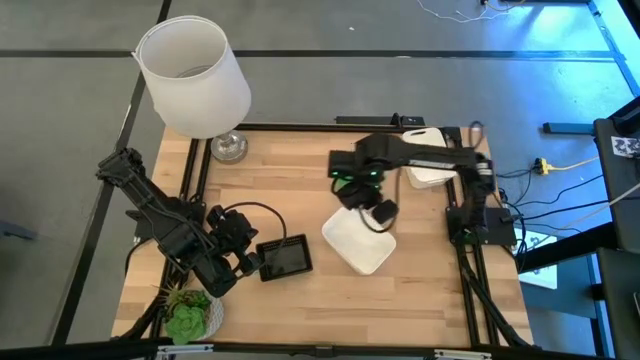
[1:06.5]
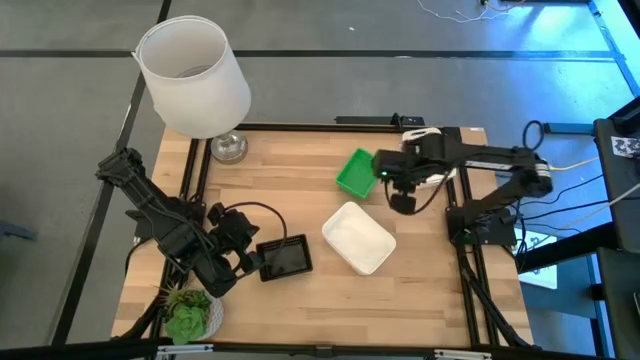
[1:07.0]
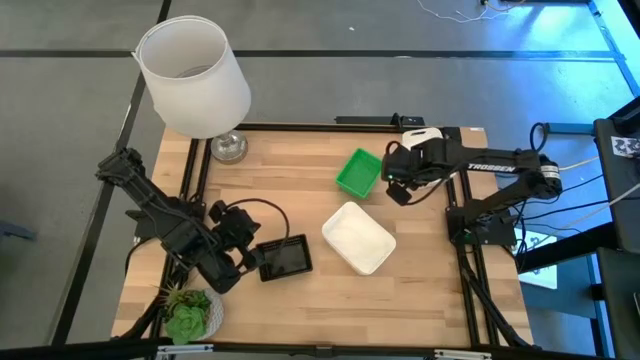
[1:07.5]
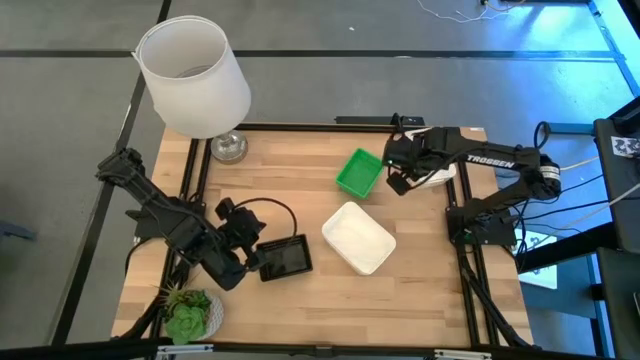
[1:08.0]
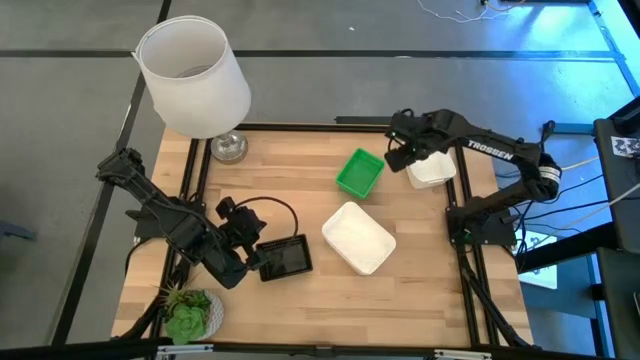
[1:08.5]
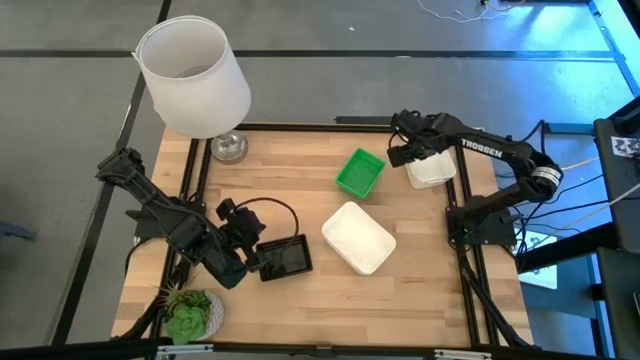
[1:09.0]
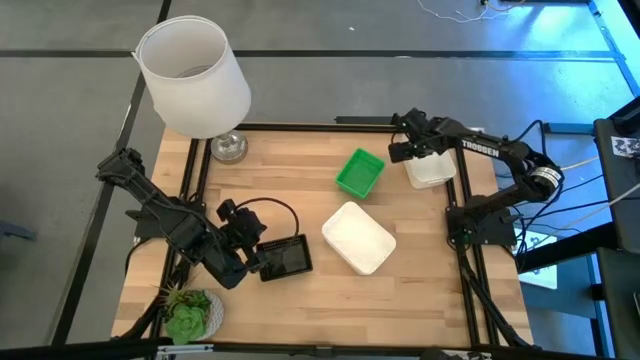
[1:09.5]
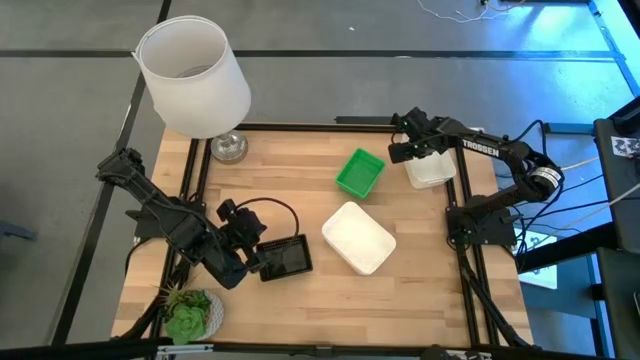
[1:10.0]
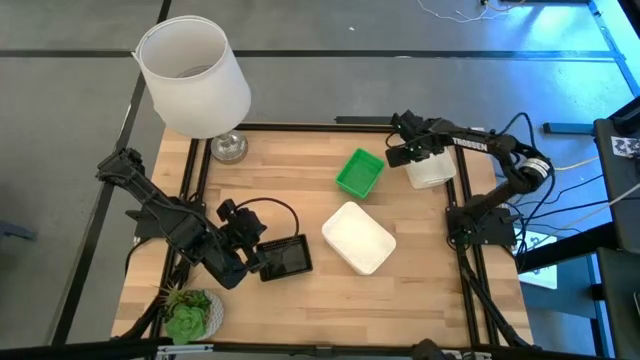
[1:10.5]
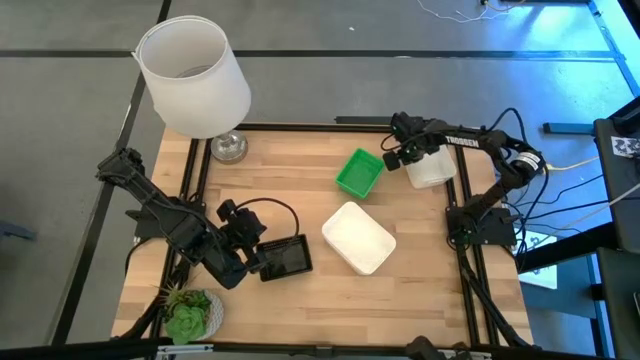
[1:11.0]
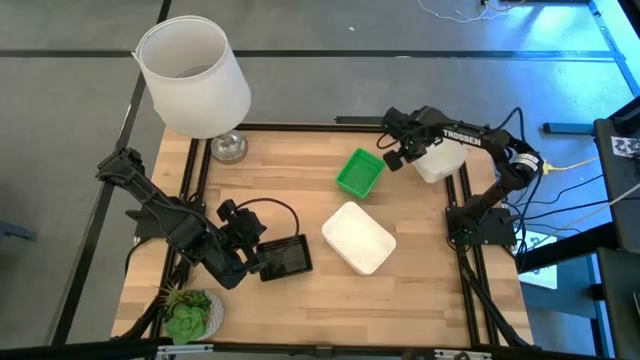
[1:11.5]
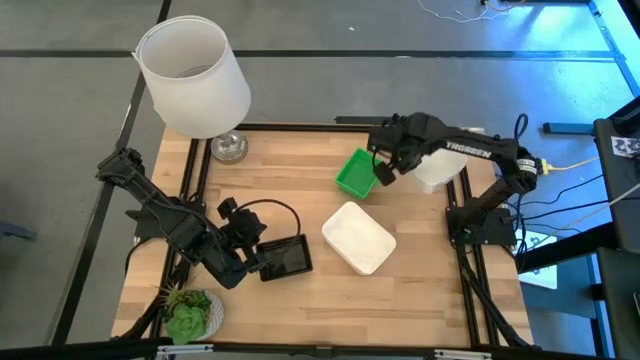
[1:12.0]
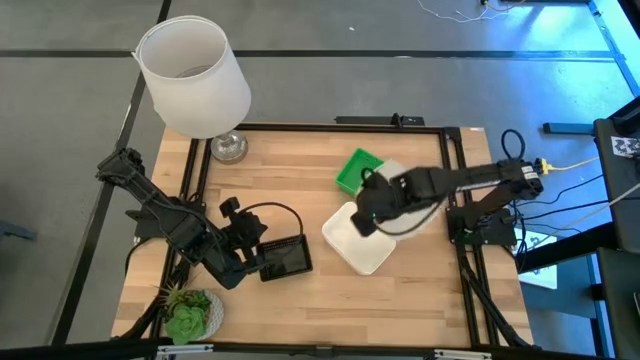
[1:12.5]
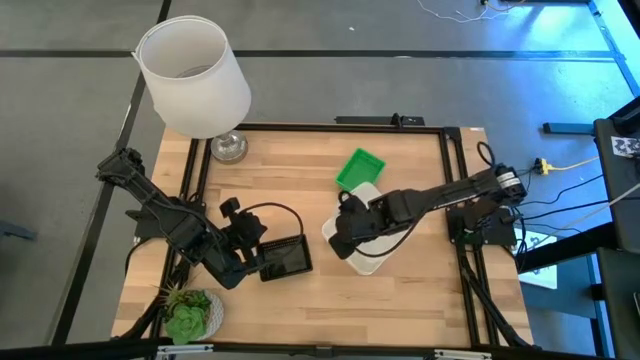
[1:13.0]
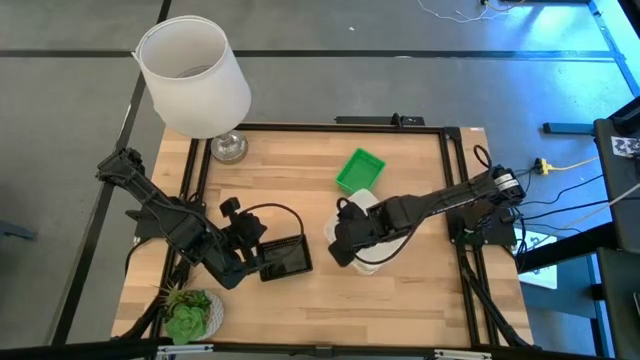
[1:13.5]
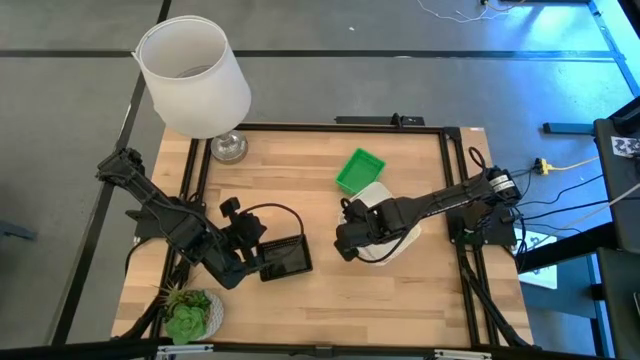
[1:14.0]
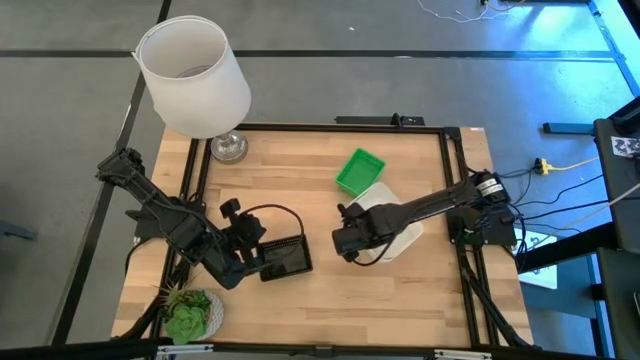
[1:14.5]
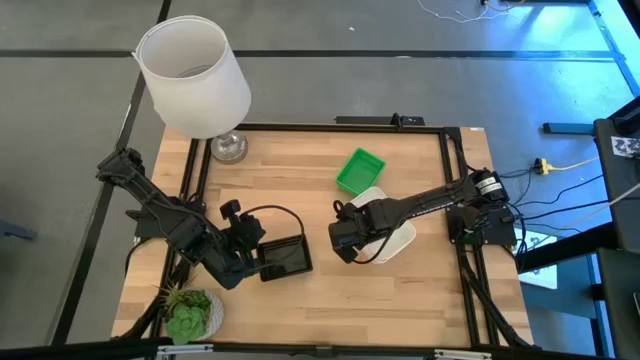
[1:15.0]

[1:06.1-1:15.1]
Stack the top white bin on the stacked white bins

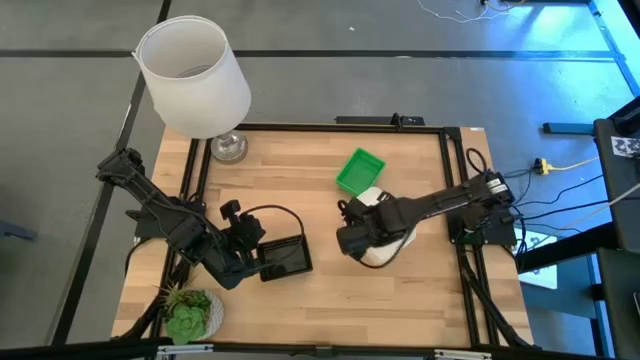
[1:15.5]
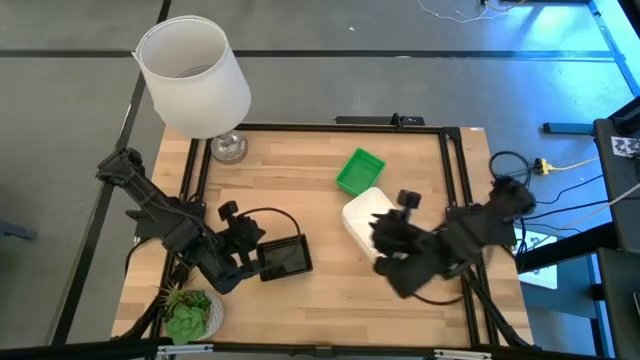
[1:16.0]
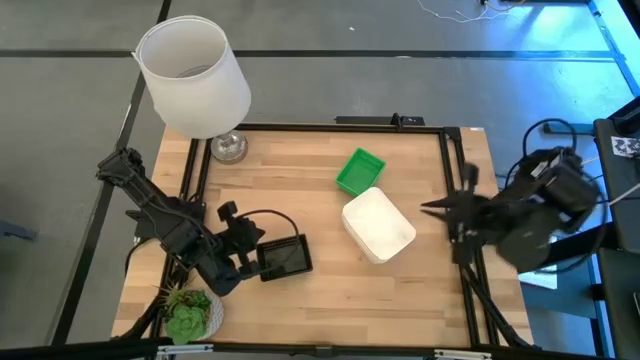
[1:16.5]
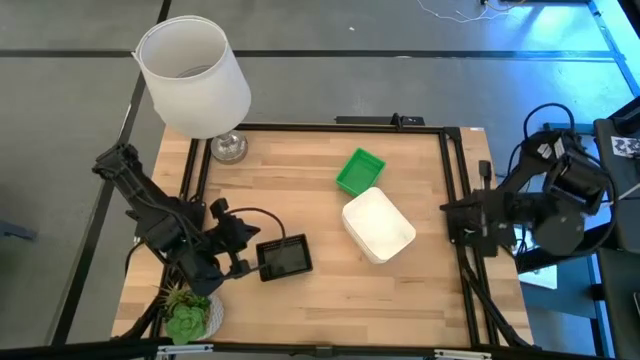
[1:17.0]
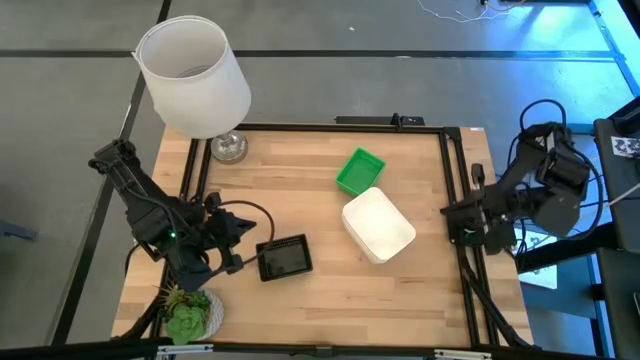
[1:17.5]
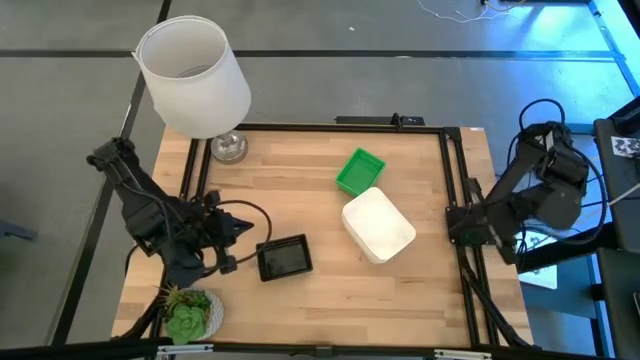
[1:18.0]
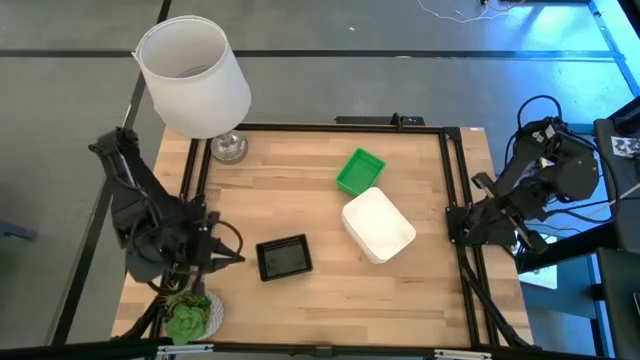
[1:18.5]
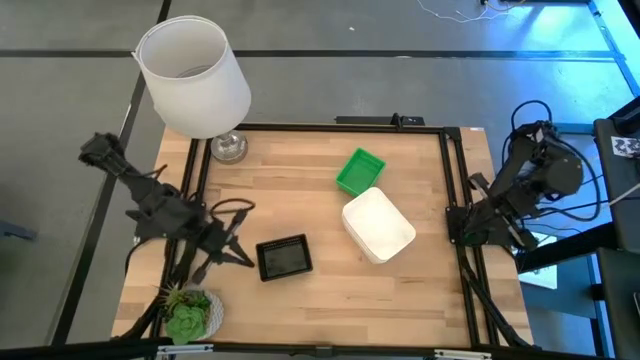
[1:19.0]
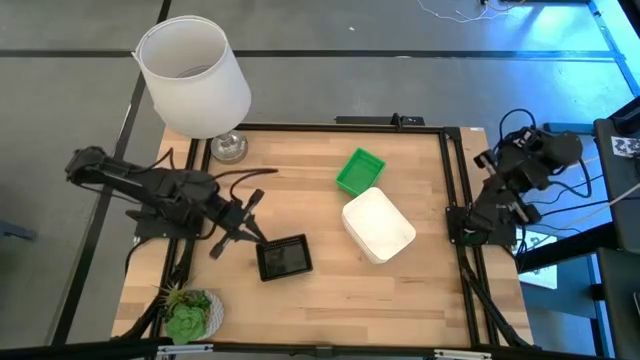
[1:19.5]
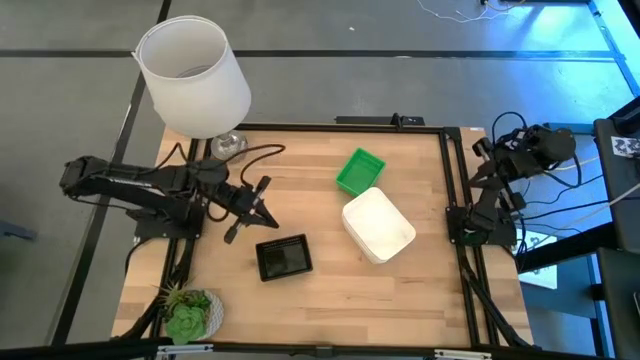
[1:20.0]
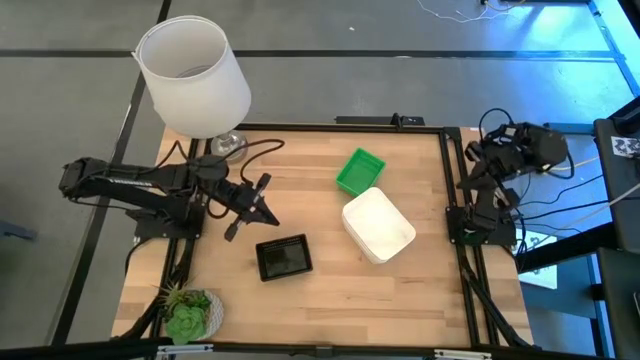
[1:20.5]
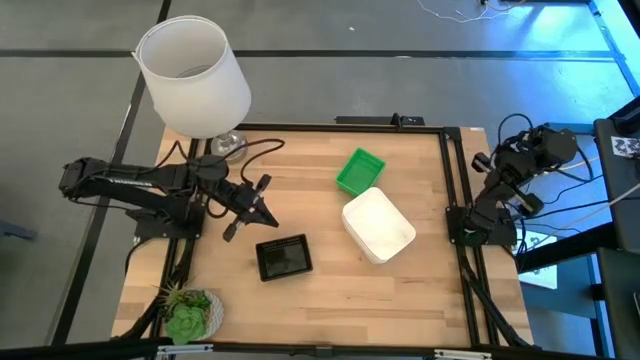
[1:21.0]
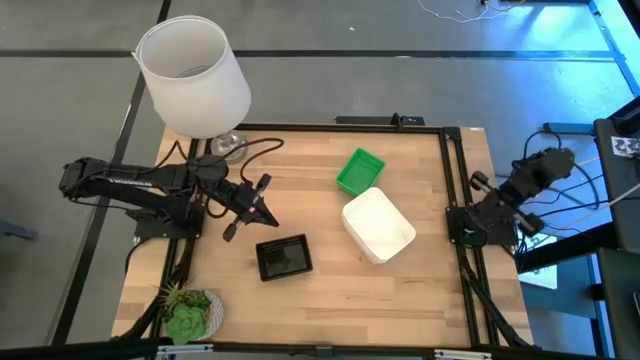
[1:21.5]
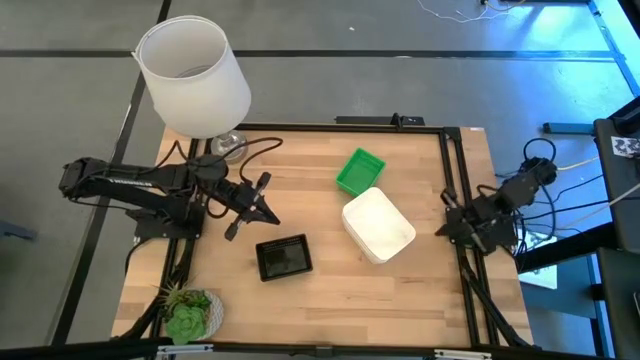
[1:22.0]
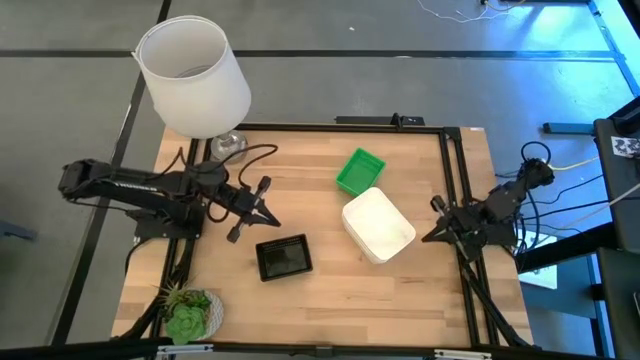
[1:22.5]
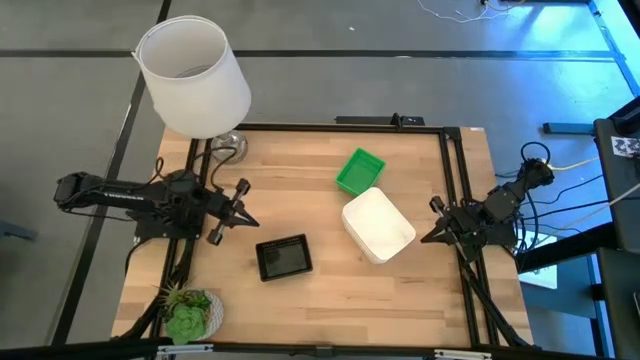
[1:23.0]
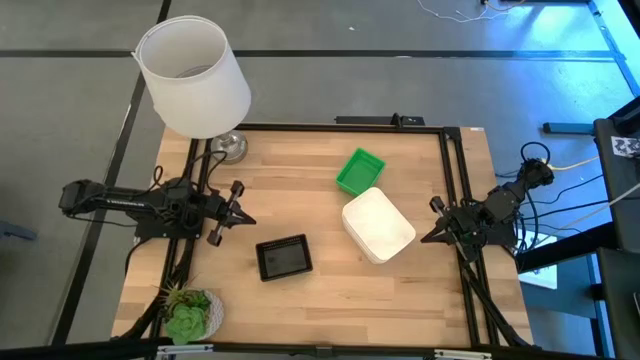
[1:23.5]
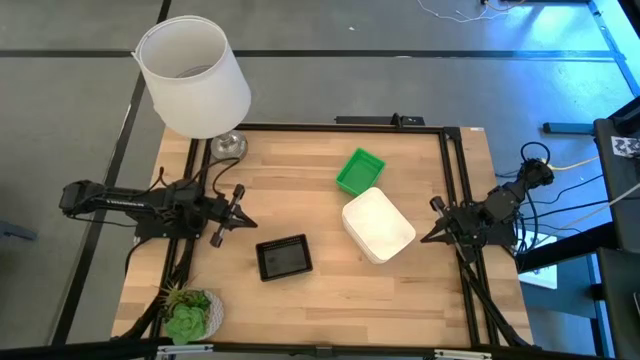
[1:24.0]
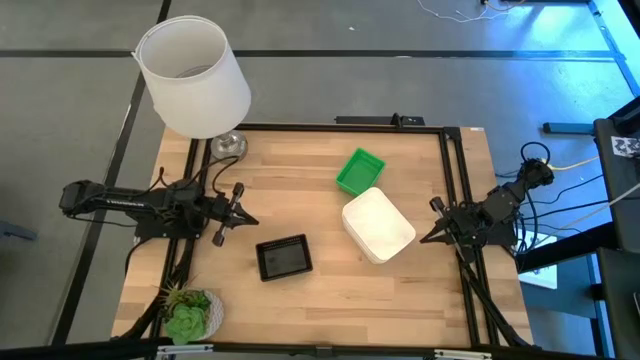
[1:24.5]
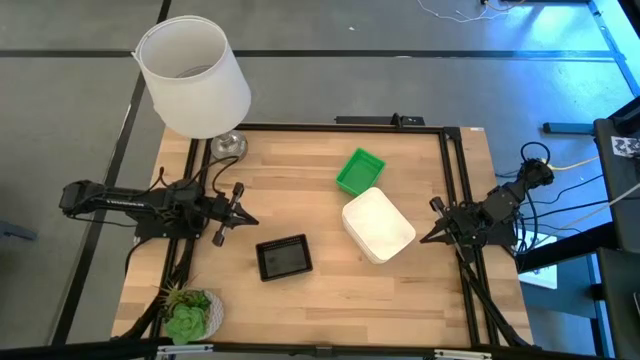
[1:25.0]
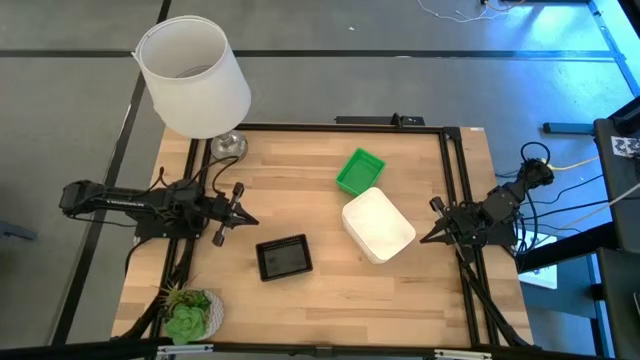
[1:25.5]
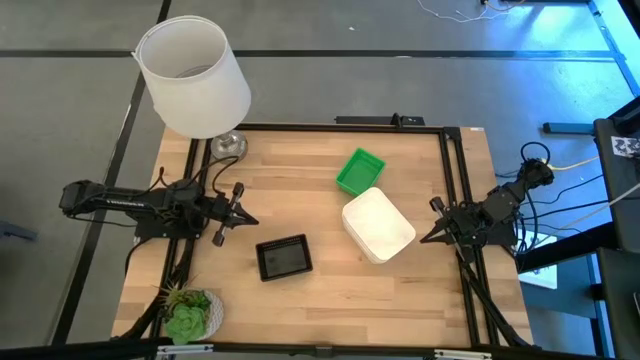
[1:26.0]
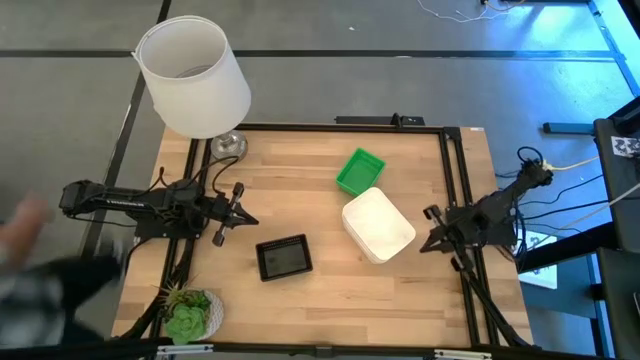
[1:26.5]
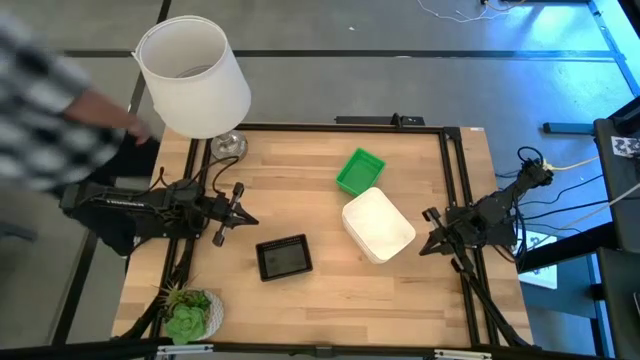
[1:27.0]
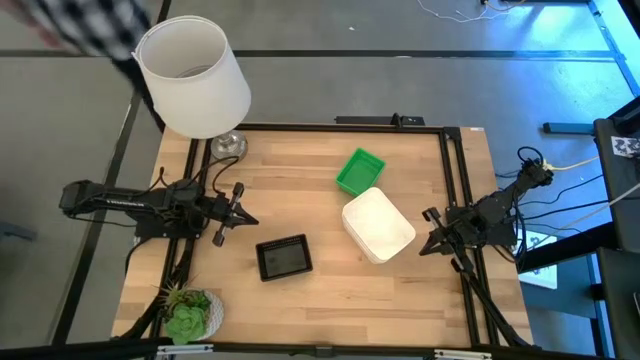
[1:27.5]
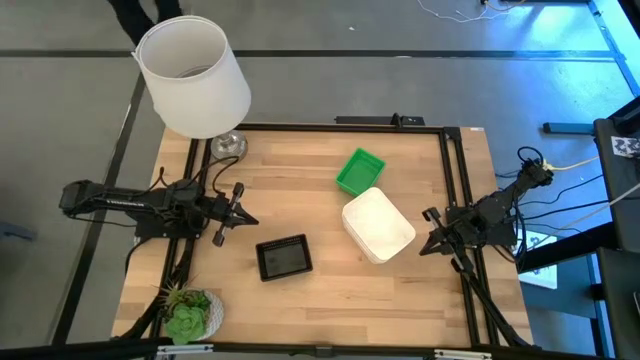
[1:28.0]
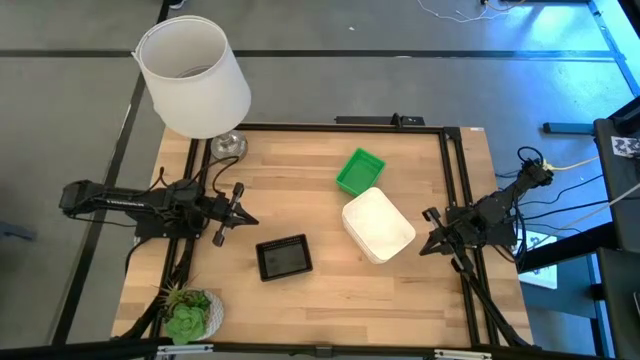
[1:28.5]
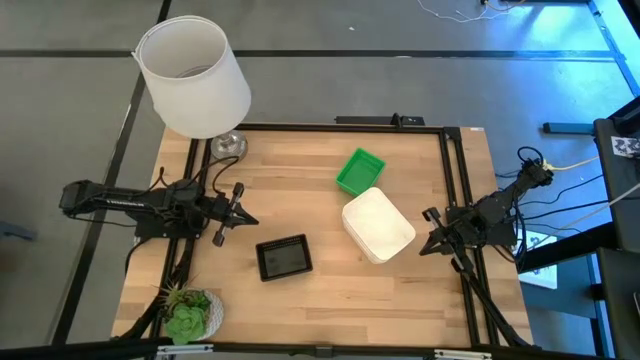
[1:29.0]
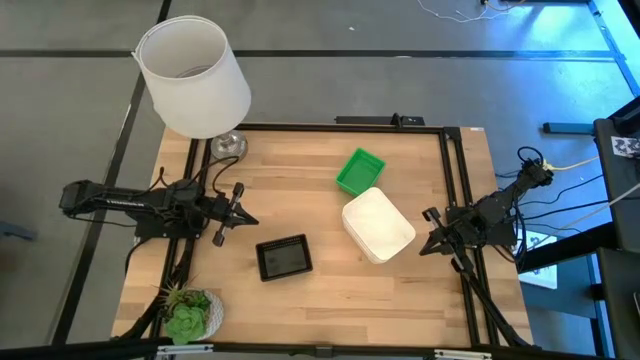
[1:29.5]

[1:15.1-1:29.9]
Return to Home Position
